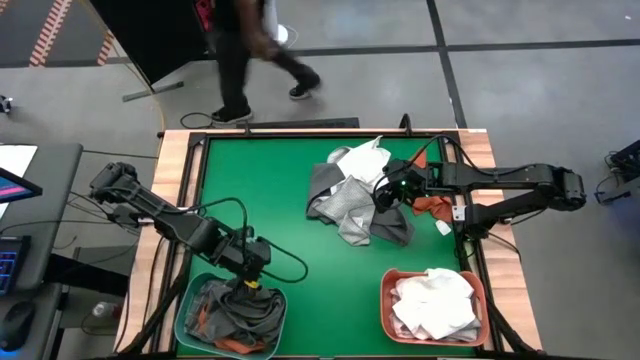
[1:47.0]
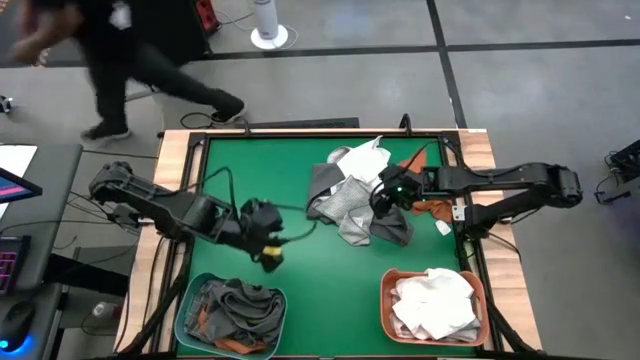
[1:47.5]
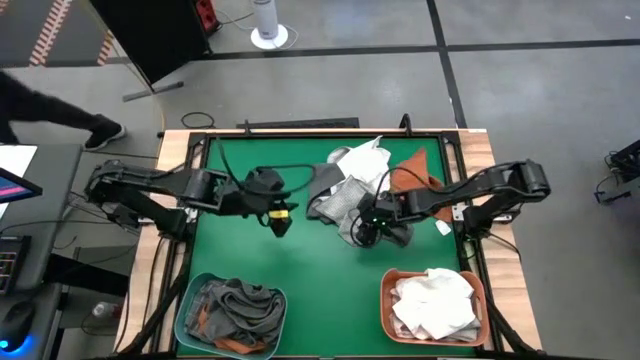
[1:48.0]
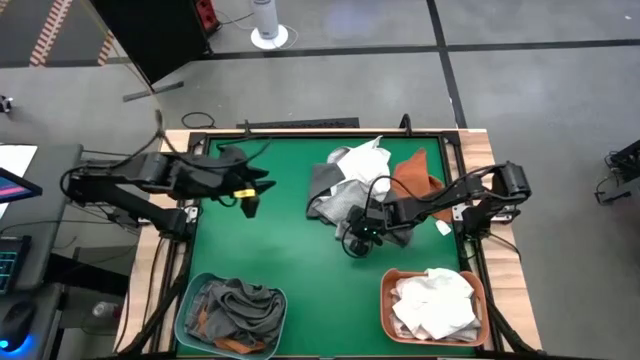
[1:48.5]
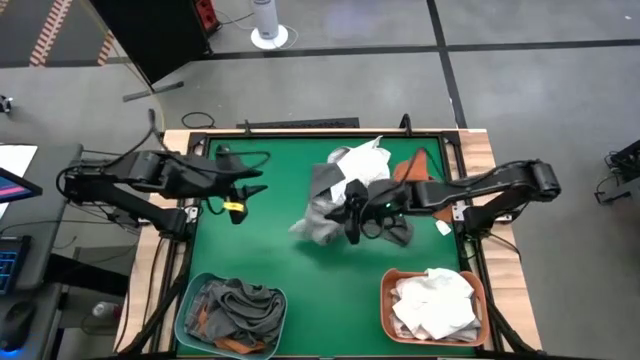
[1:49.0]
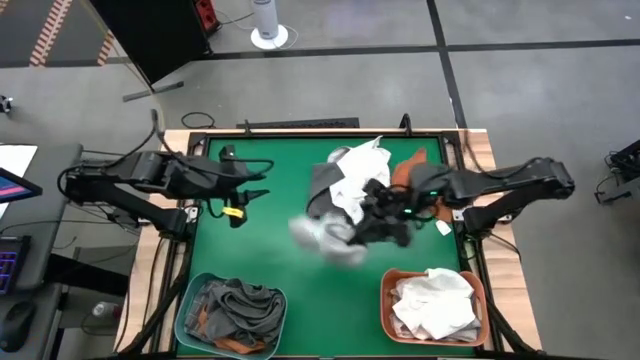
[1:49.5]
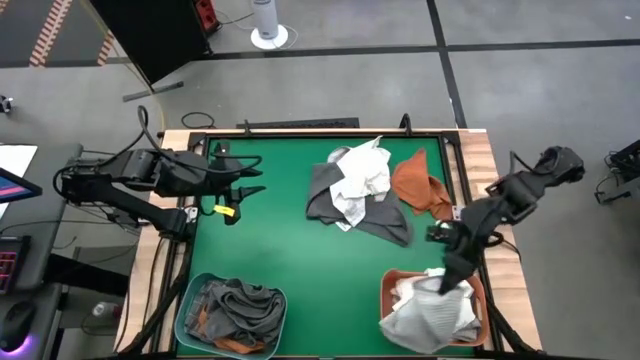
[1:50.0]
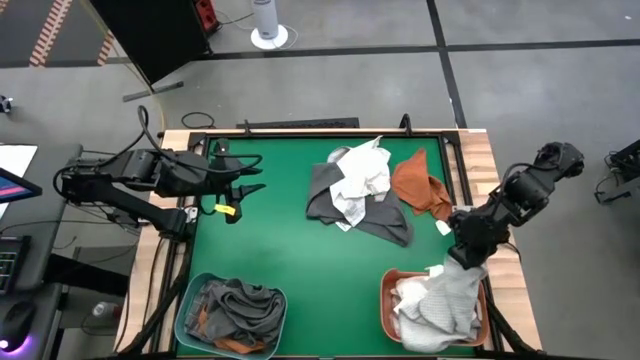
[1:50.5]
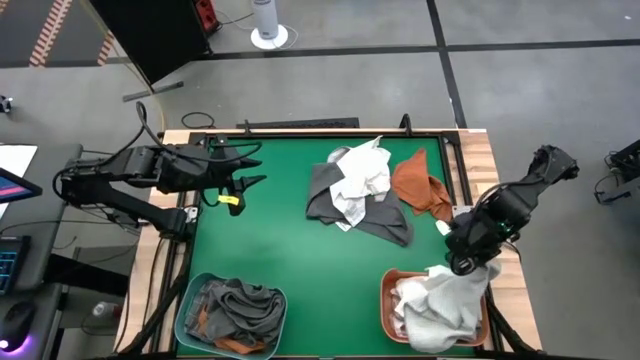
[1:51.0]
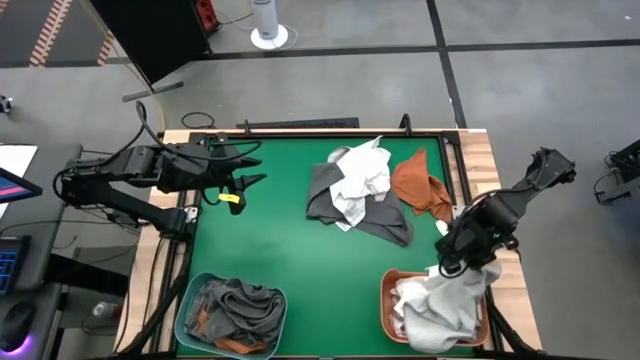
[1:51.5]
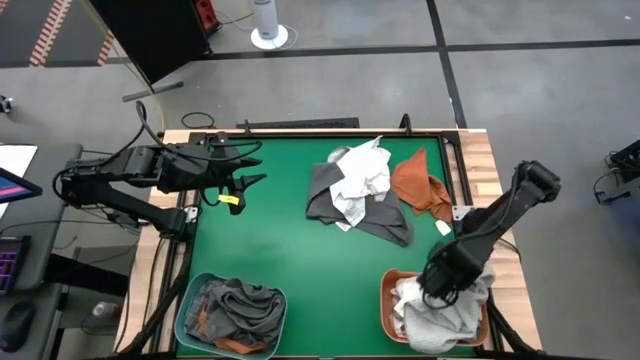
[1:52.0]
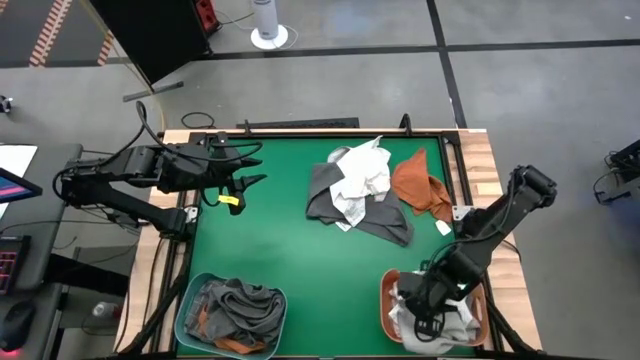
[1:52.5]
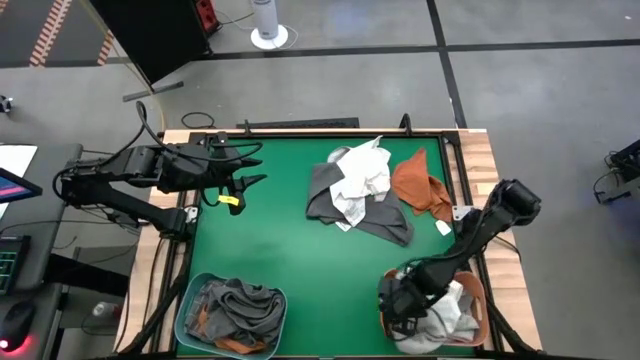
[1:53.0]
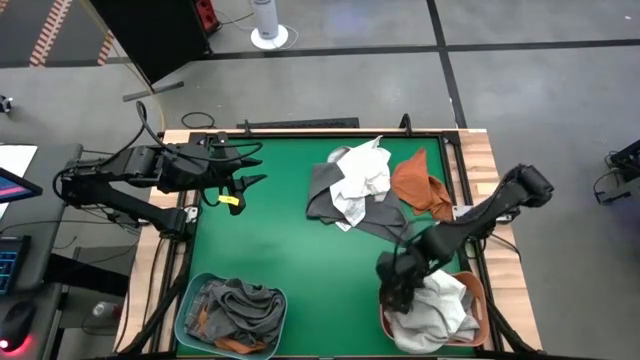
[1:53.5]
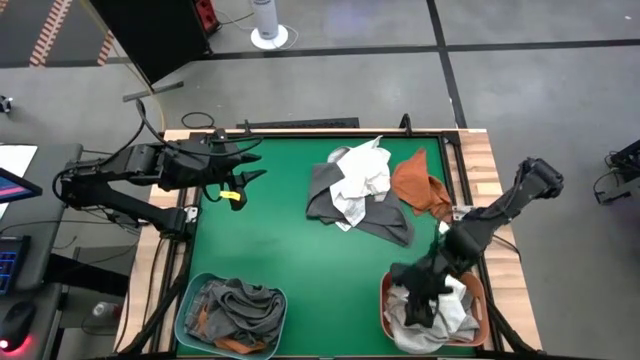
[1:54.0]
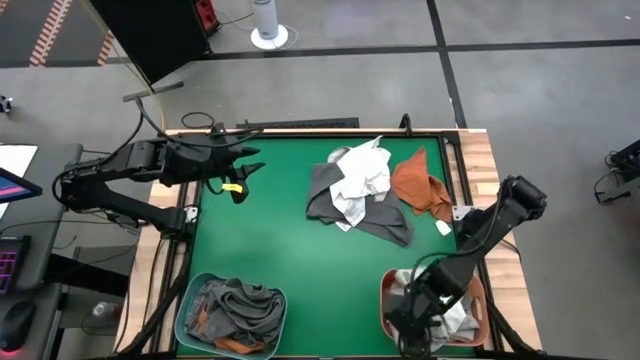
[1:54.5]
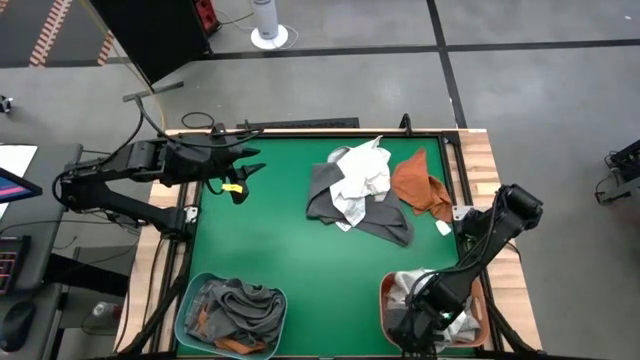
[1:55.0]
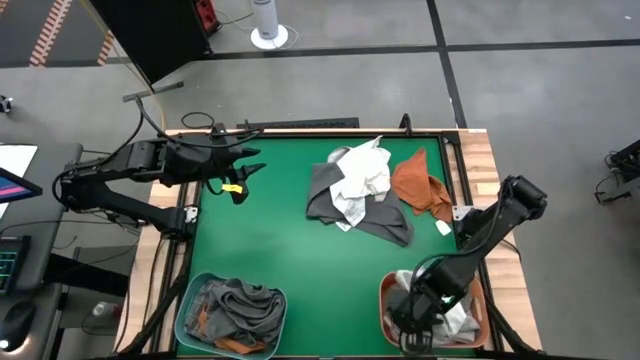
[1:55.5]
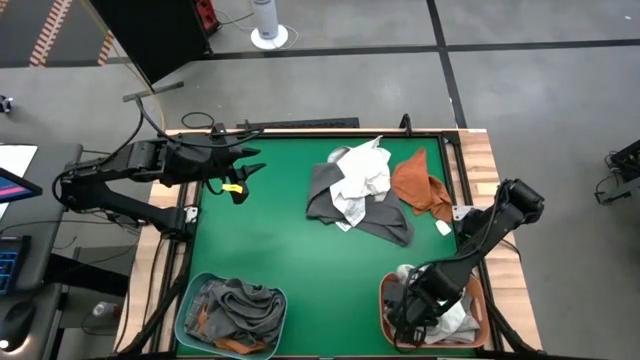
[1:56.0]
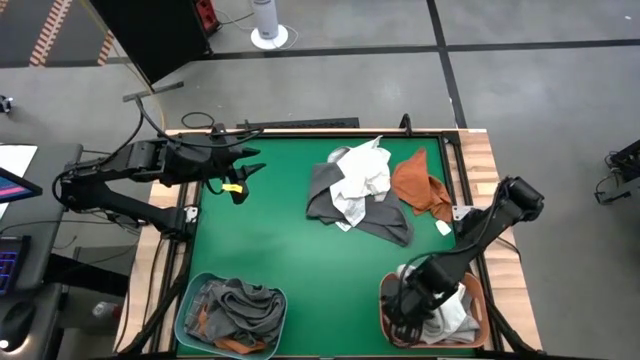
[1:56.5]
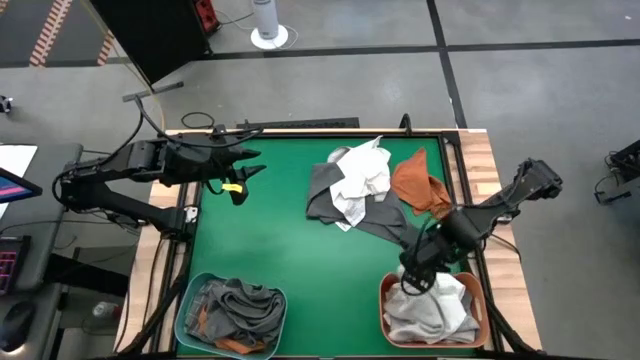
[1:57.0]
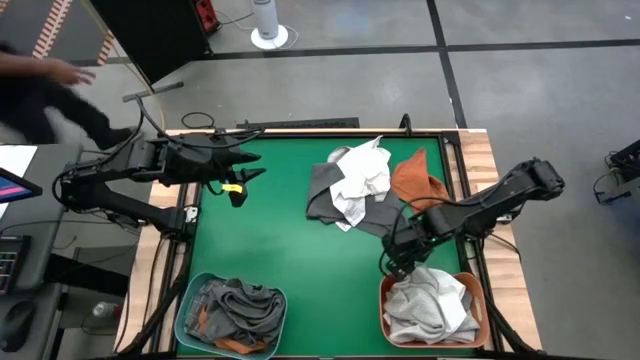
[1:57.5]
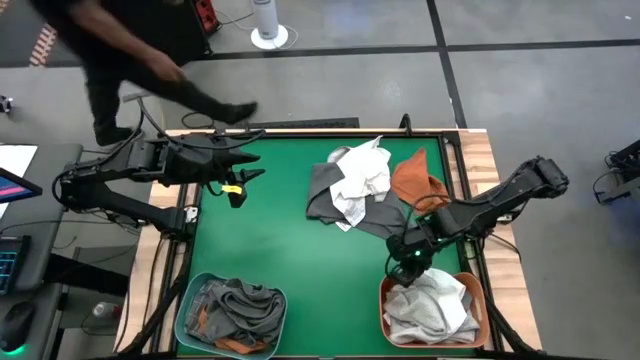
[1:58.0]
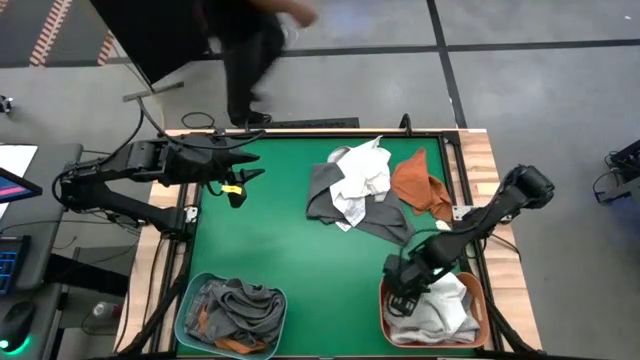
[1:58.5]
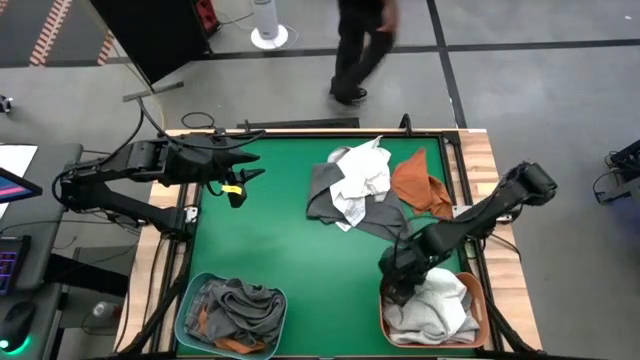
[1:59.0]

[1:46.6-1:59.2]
Task: Sort towels by color in basket
Put the bottom light gray towel into the orange bin

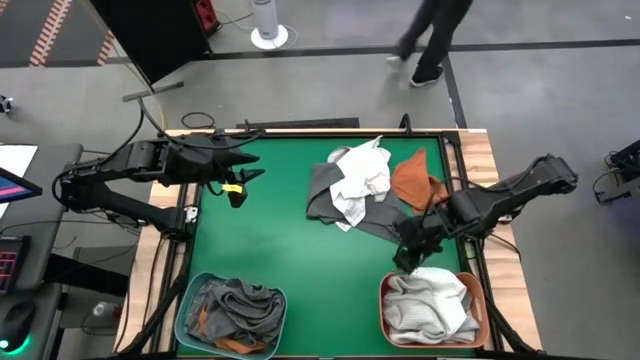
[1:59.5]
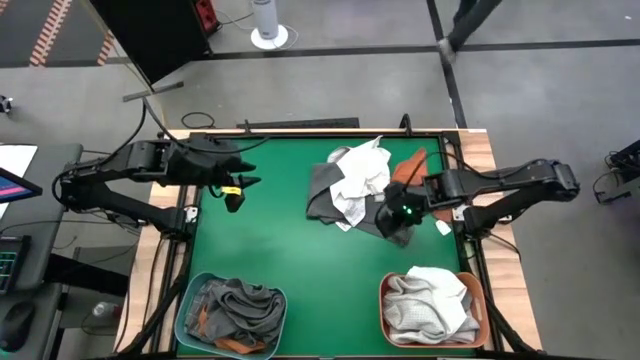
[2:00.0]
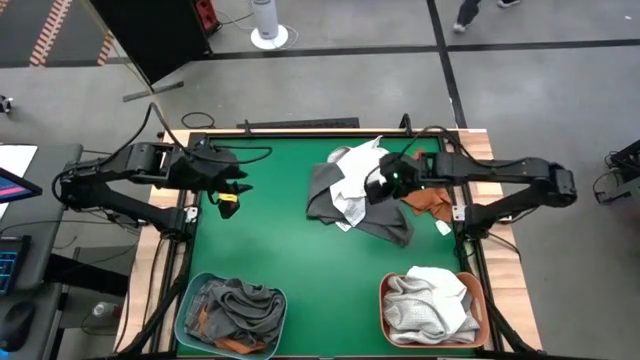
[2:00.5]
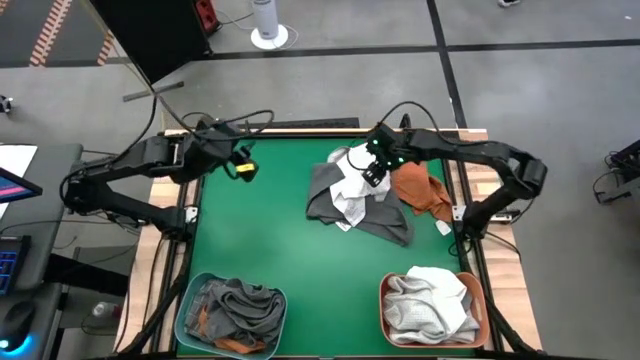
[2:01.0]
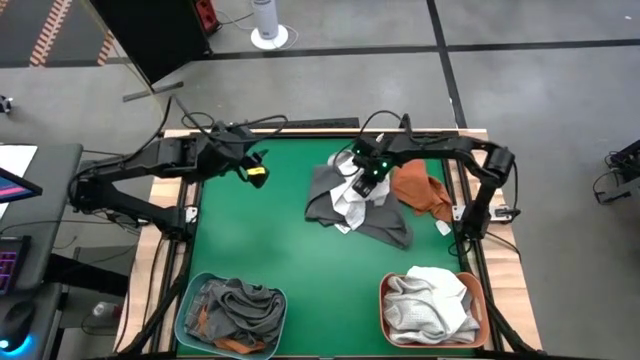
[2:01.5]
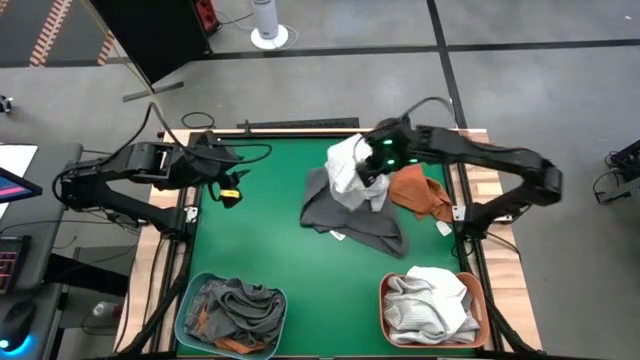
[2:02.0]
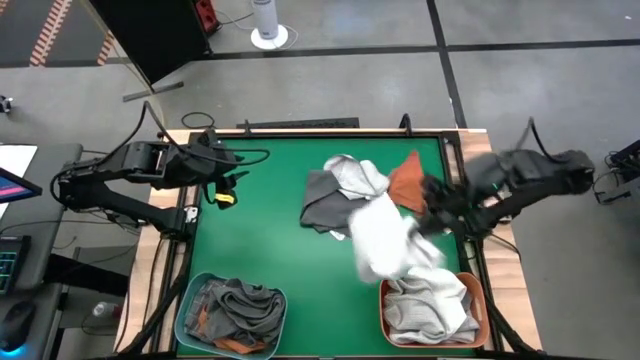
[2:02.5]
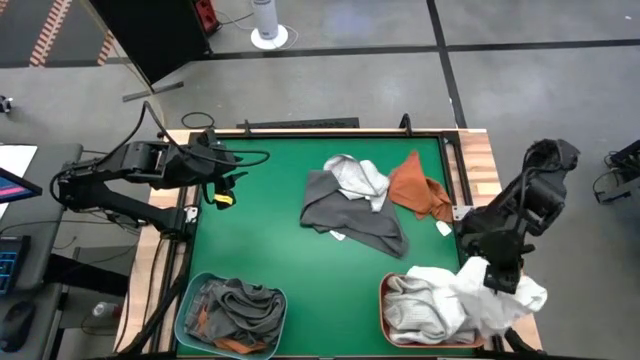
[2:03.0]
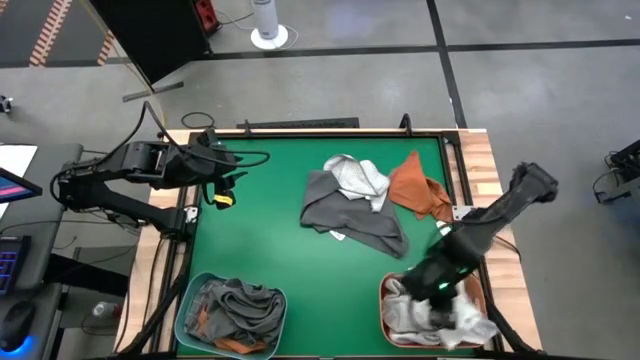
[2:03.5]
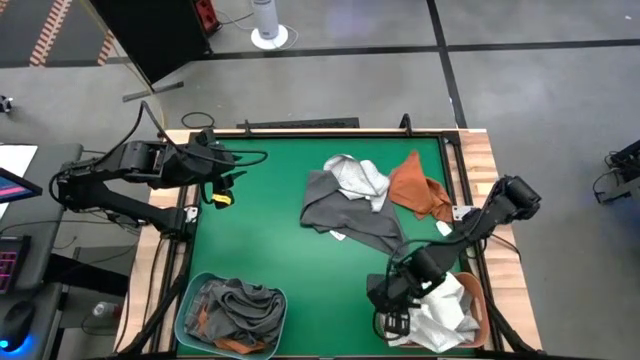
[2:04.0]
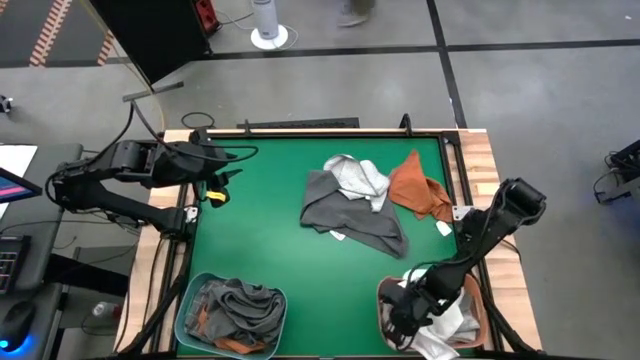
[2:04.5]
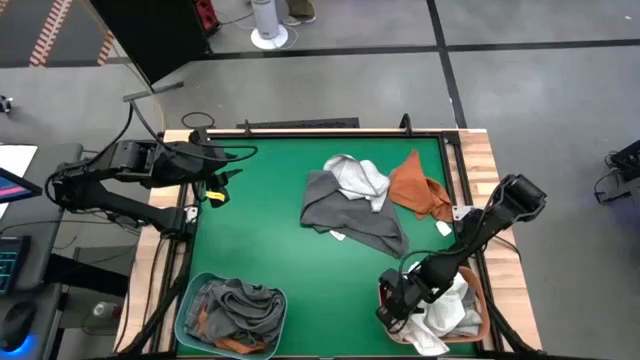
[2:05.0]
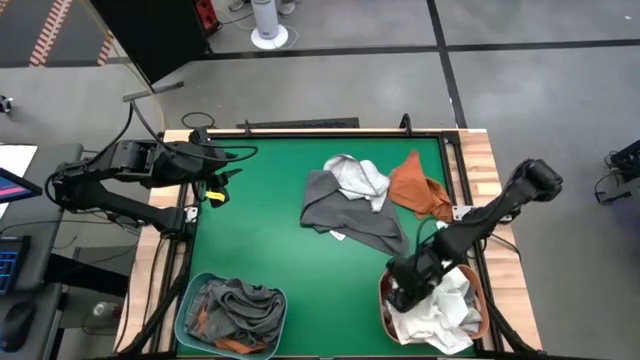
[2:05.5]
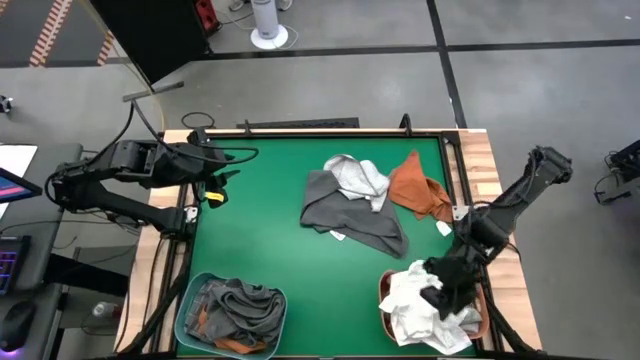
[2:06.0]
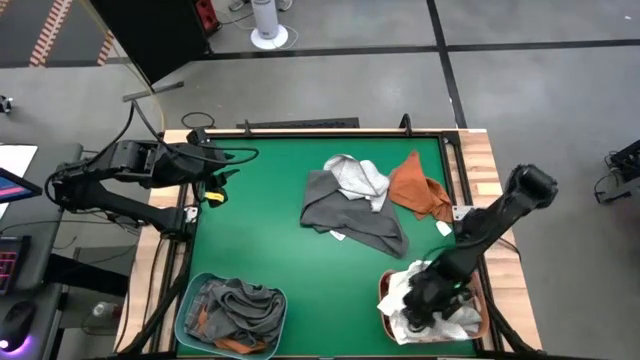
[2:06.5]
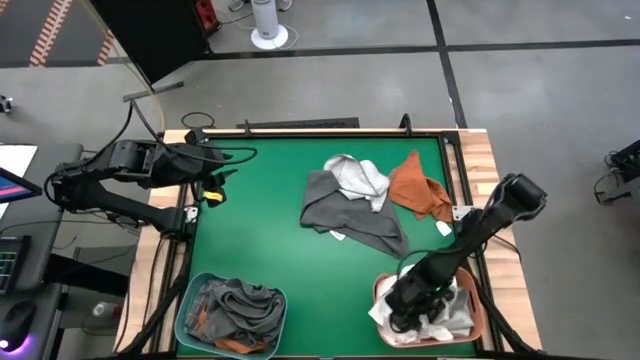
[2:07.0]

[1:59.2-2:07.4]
Put the white towel into the orange bin
